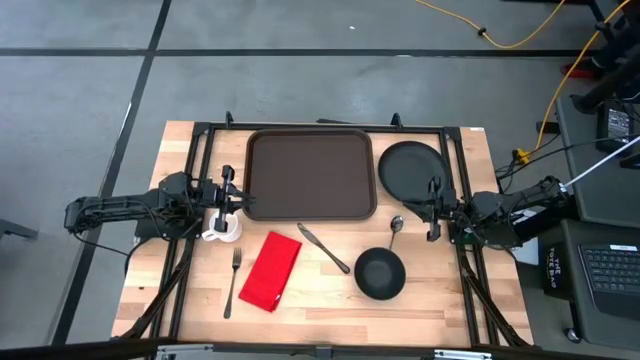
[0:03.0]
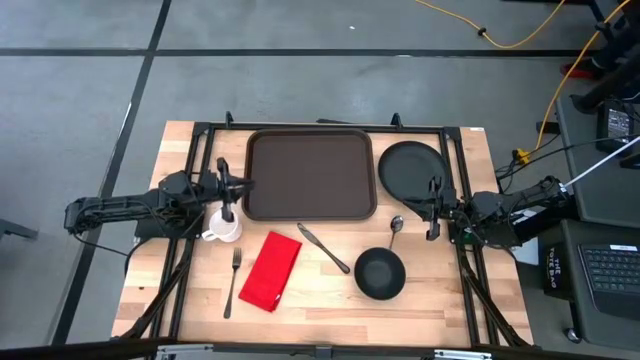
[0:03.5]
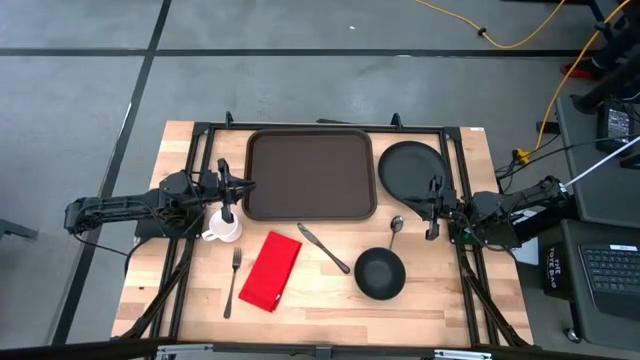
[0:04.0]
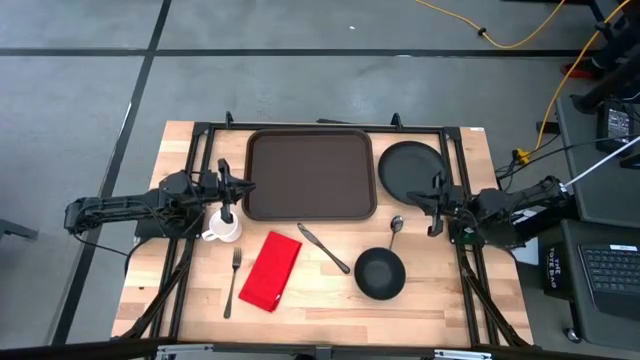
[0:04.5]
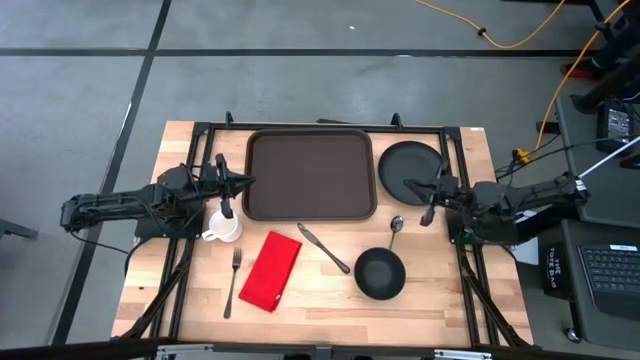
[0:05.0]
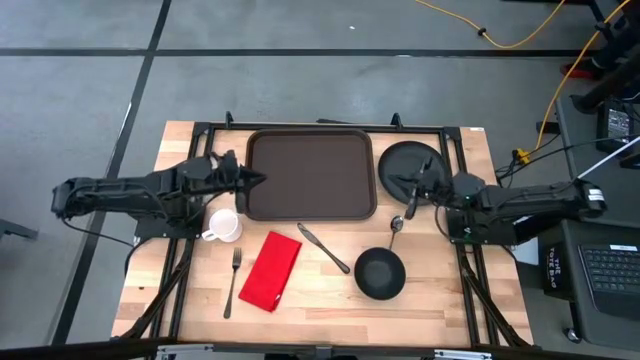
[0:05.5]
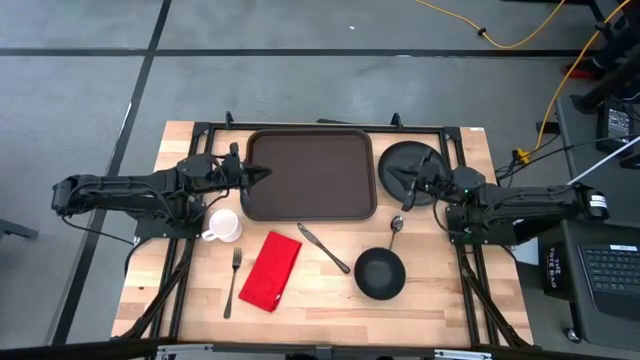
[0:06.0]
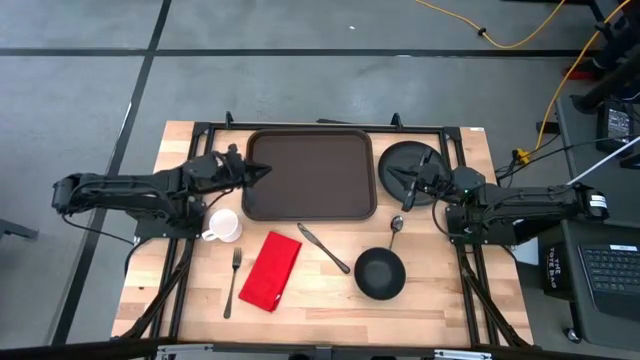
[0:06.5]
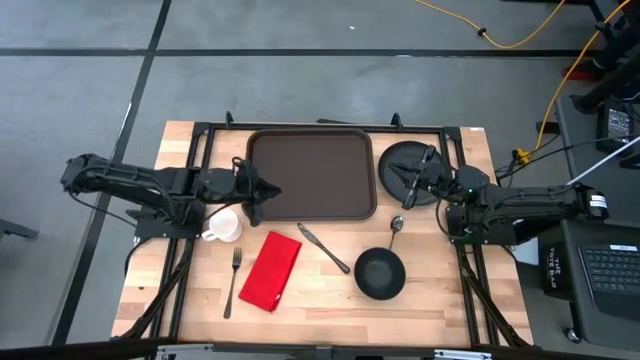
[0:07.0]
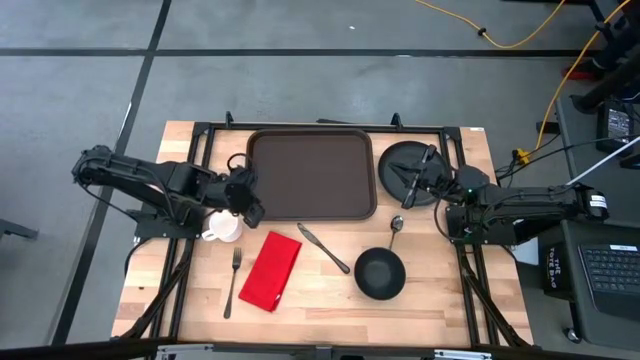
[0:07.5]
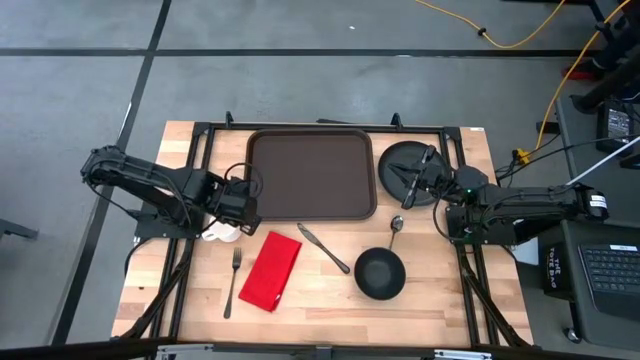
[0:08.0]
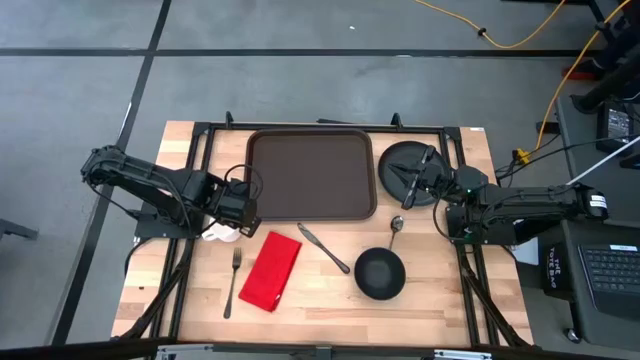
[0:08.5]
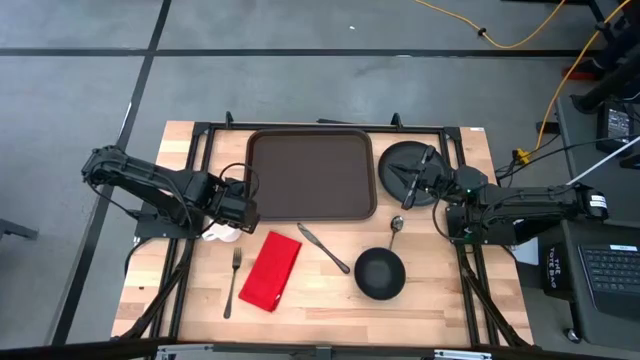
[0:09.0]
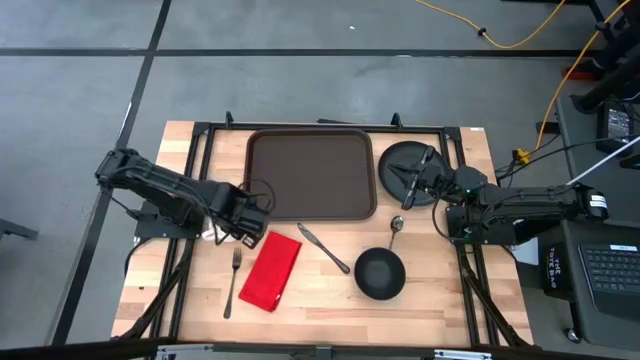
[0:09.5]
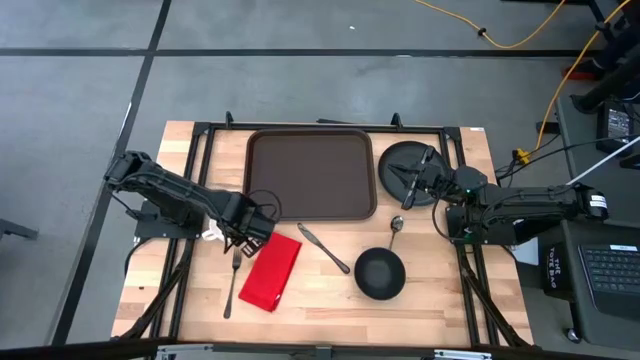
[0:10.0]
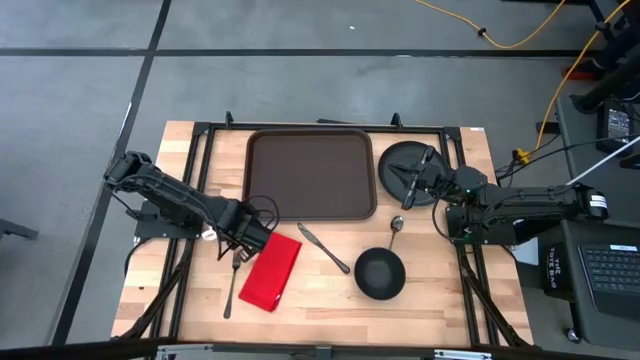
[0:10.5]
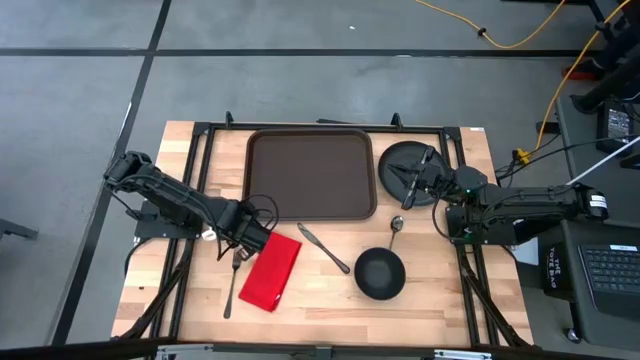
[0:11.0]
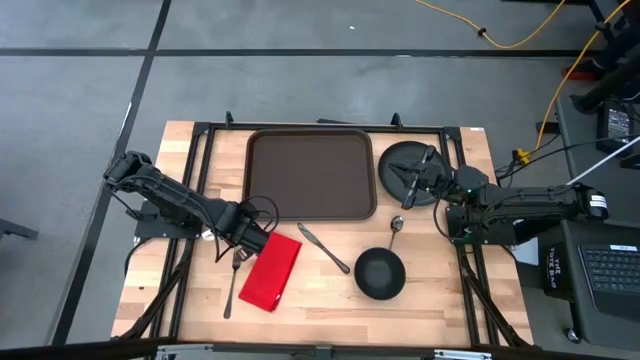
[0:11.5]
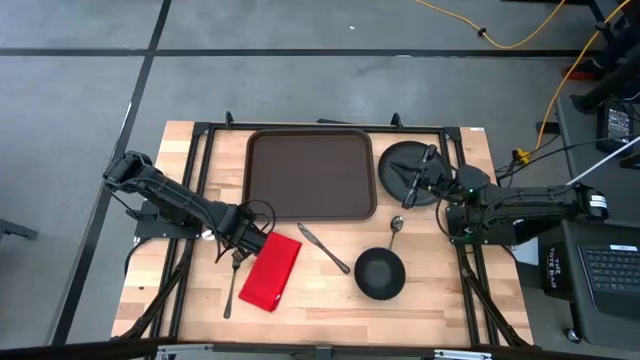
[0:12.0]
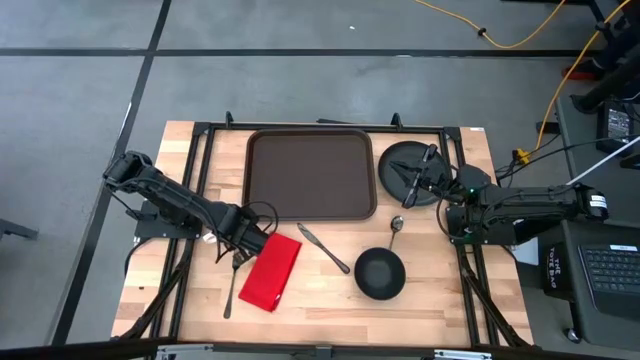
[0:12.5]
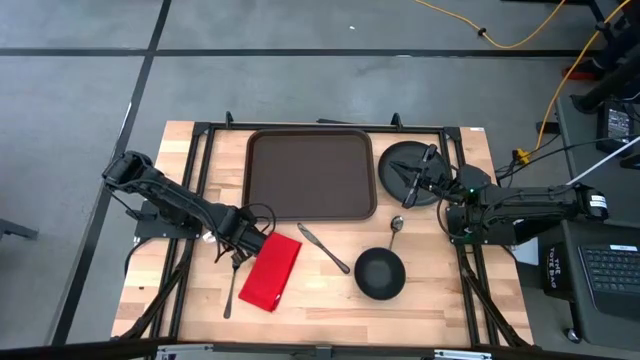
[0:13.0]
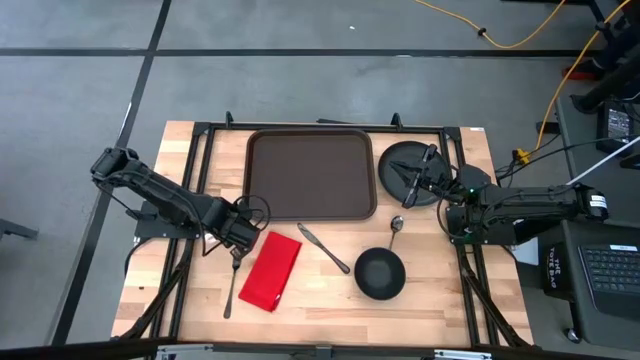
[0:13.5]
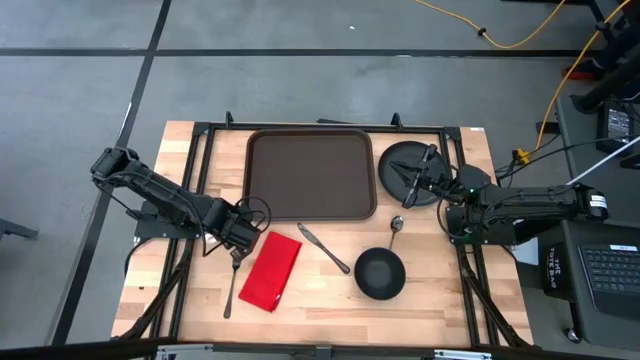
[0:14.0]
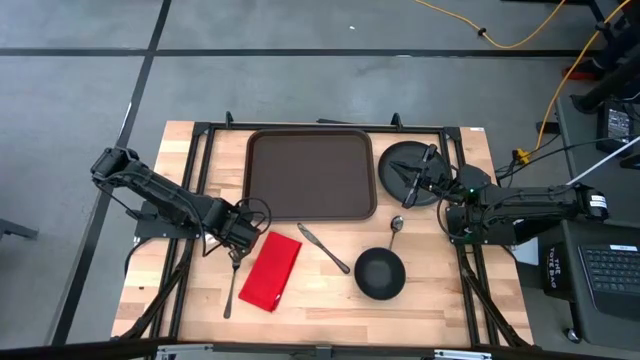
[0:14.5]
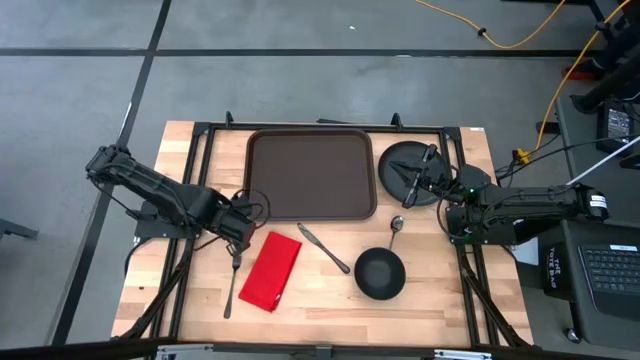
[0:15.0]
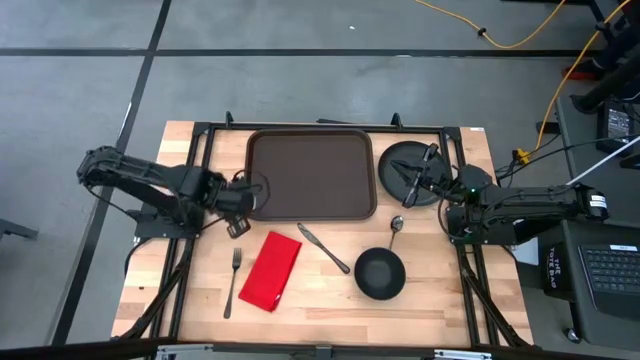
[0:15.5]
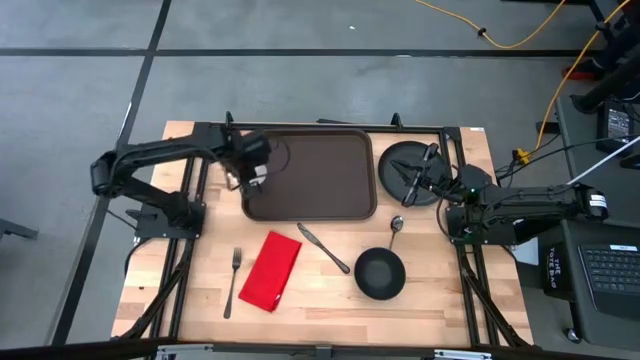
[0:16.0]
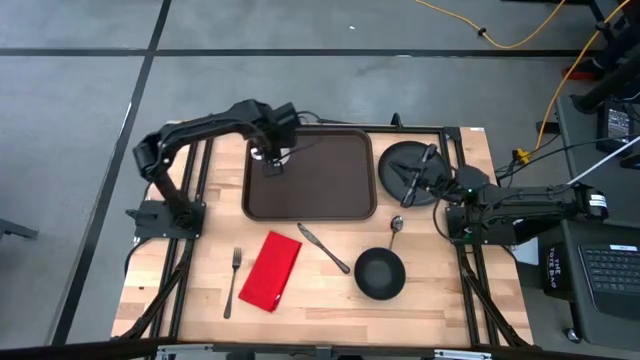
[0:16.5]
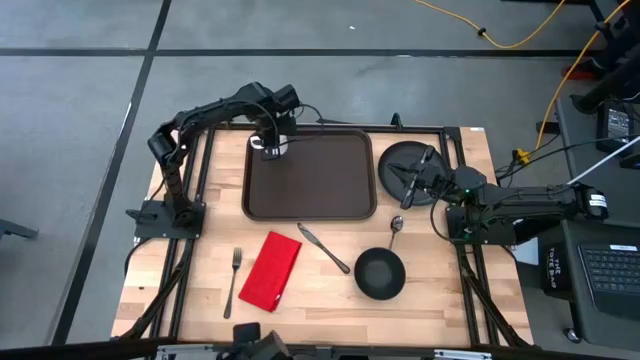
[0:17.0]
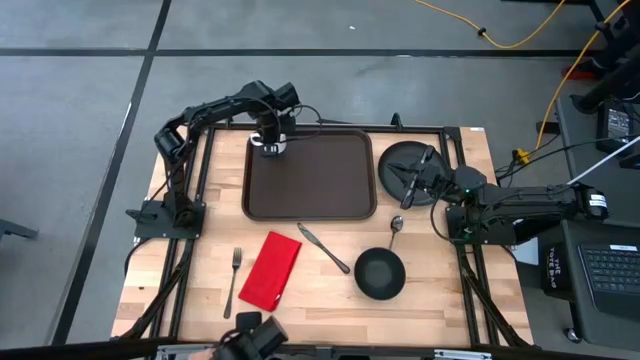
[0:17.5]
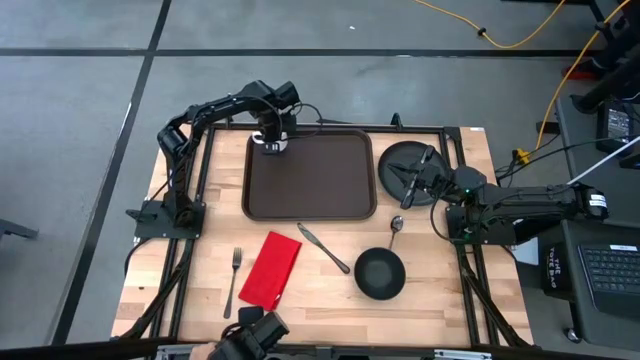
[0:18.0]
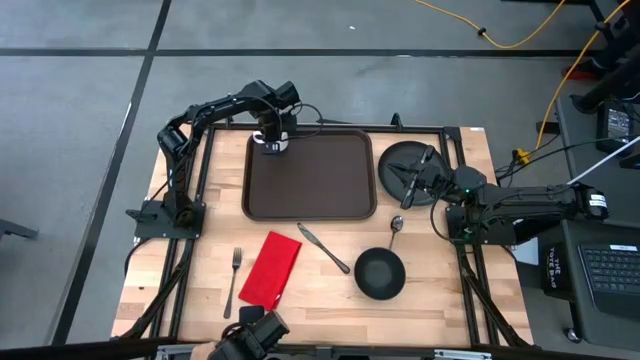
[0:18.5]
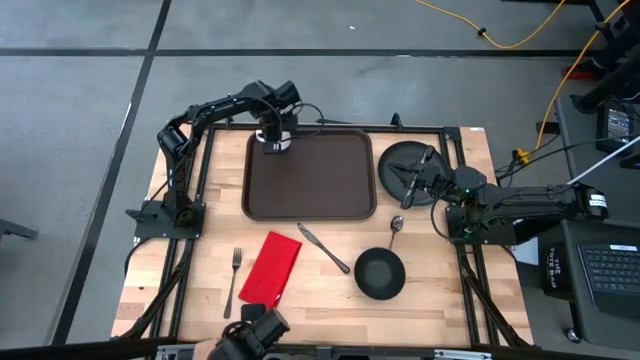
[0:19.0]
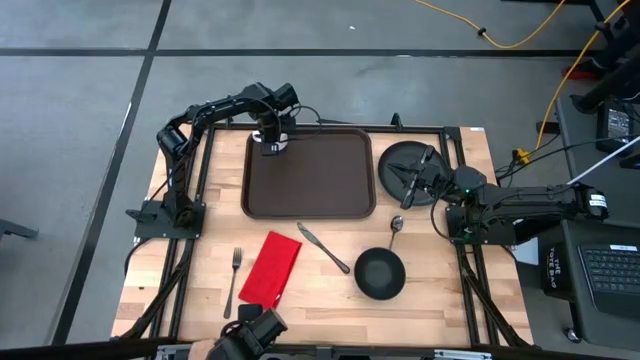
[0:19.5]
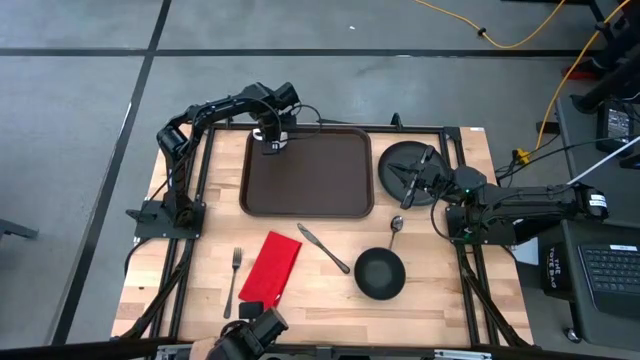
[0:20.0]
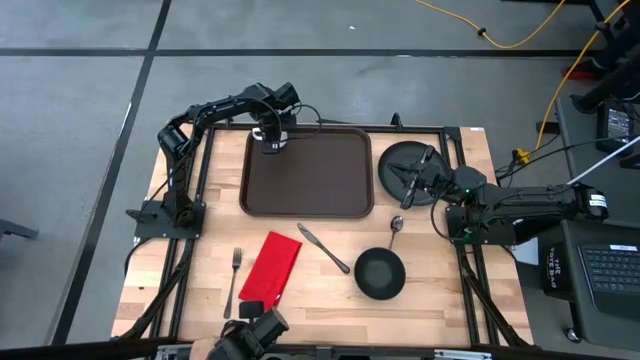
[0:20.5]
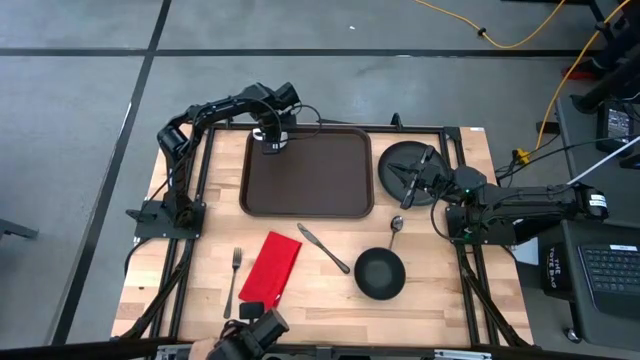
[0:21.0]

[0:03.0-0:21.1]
Task: Set up tray
Put the white mug on the brown tray
